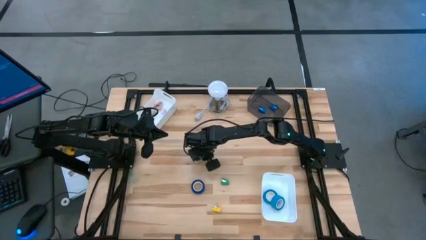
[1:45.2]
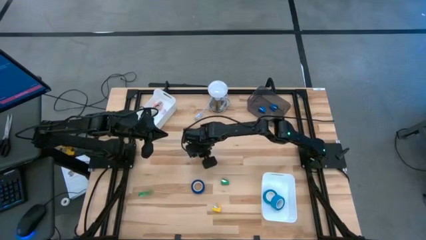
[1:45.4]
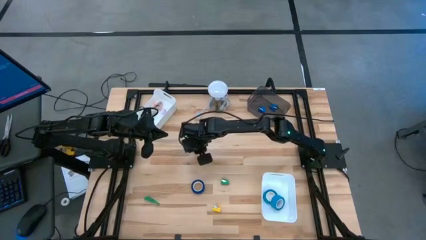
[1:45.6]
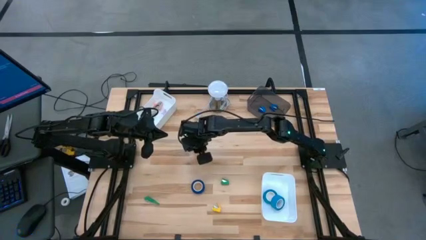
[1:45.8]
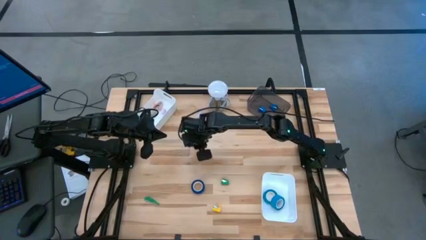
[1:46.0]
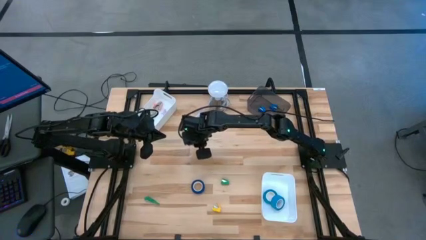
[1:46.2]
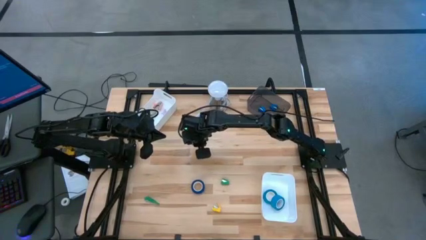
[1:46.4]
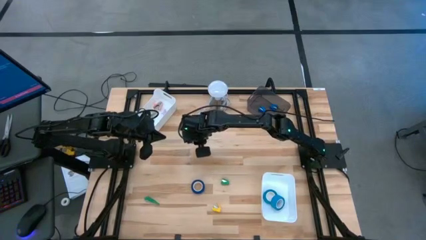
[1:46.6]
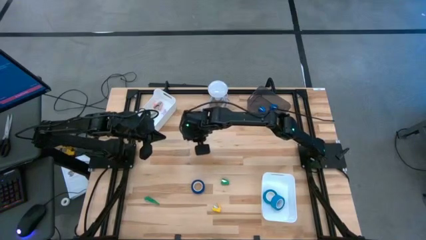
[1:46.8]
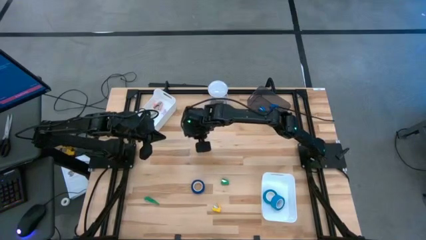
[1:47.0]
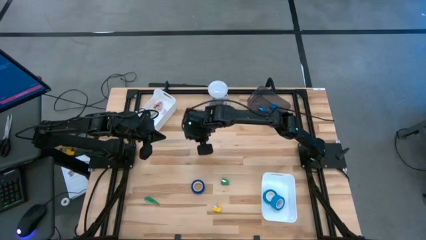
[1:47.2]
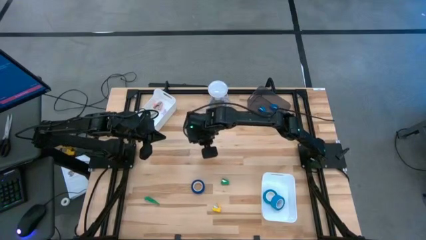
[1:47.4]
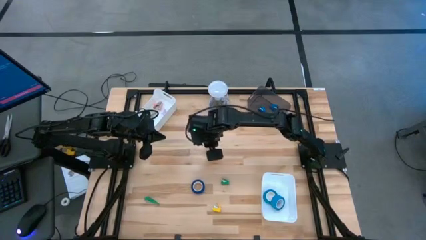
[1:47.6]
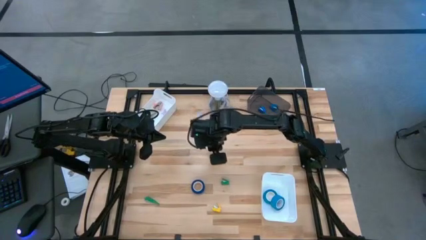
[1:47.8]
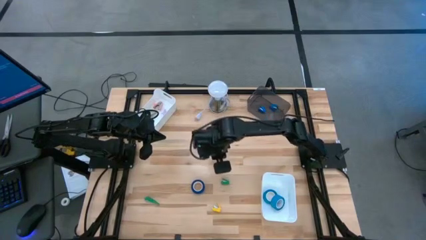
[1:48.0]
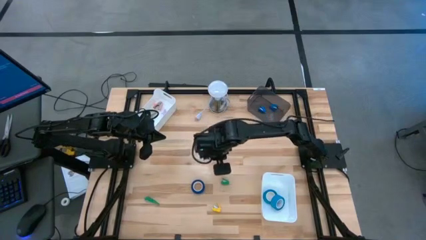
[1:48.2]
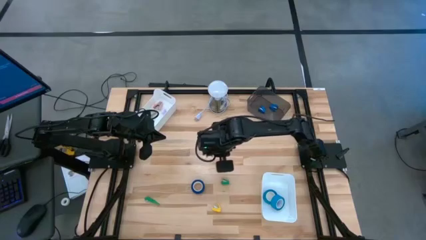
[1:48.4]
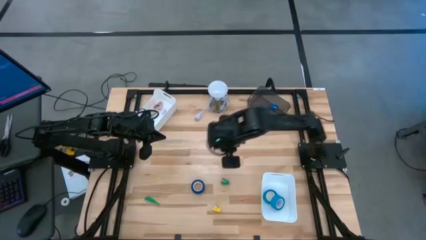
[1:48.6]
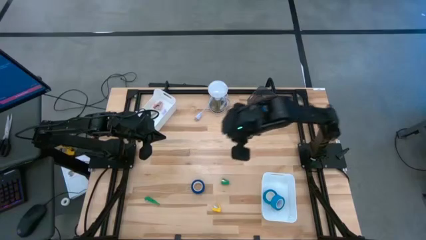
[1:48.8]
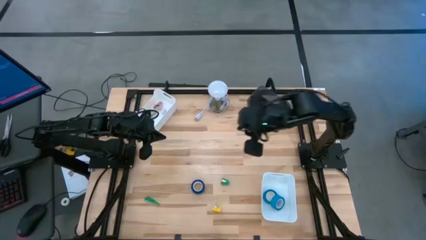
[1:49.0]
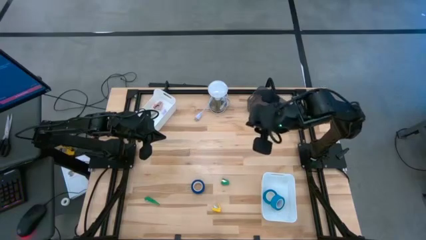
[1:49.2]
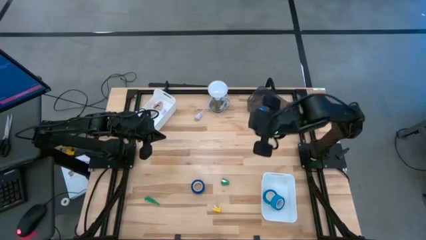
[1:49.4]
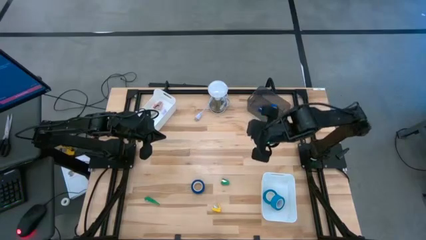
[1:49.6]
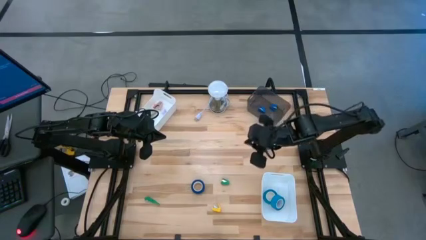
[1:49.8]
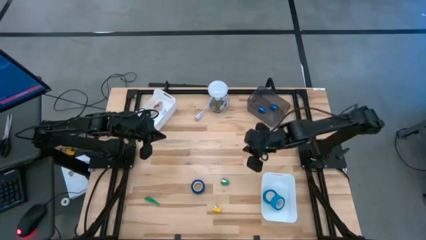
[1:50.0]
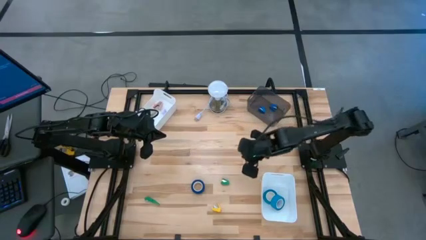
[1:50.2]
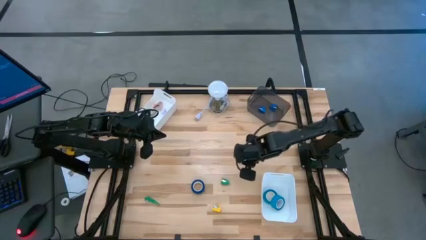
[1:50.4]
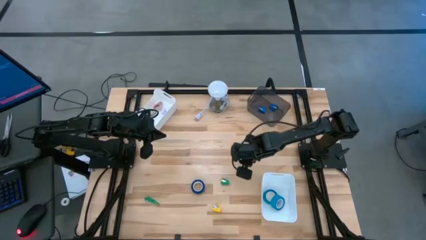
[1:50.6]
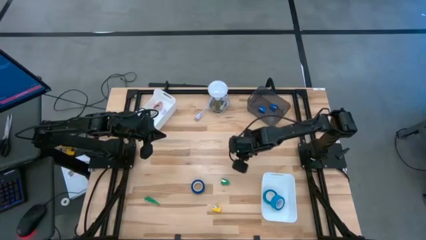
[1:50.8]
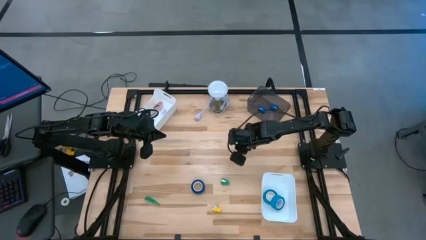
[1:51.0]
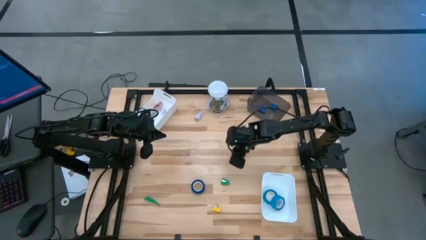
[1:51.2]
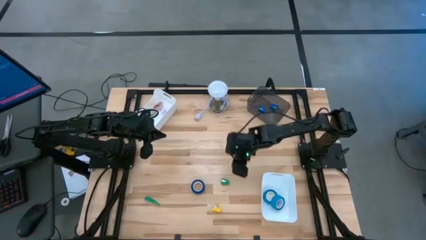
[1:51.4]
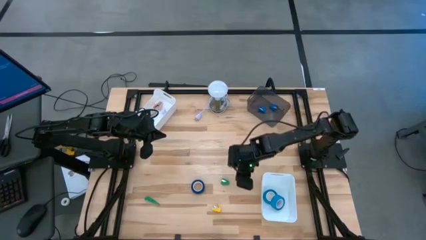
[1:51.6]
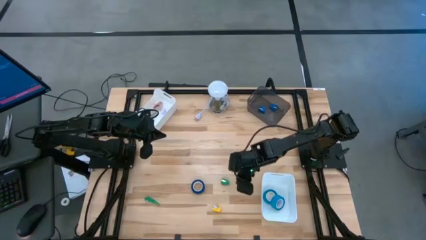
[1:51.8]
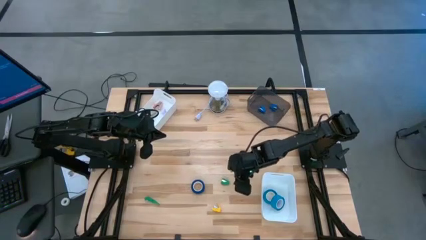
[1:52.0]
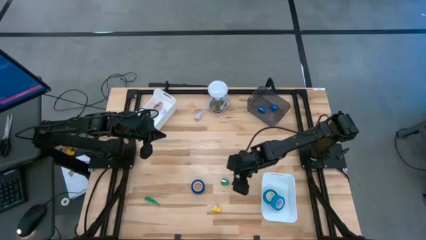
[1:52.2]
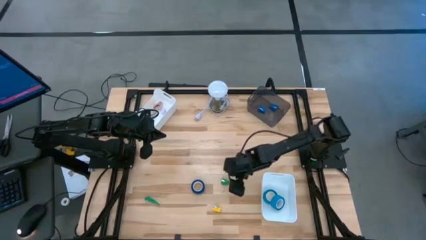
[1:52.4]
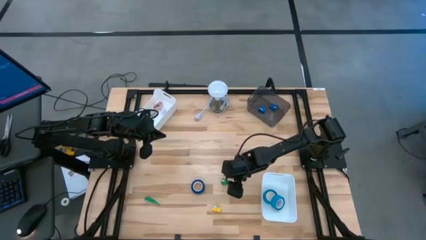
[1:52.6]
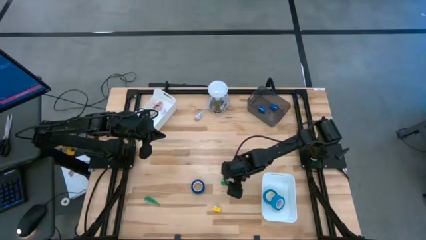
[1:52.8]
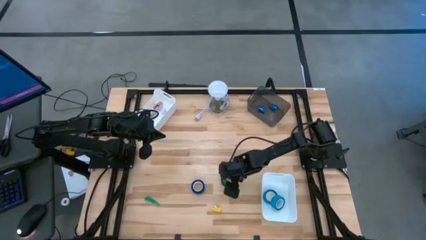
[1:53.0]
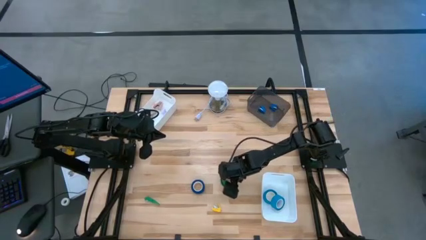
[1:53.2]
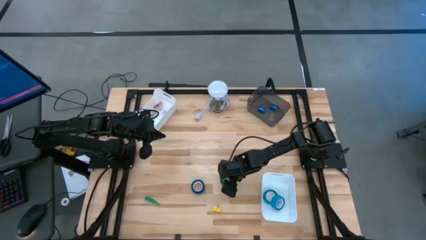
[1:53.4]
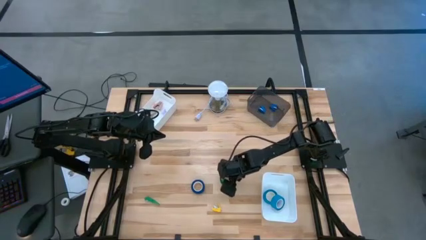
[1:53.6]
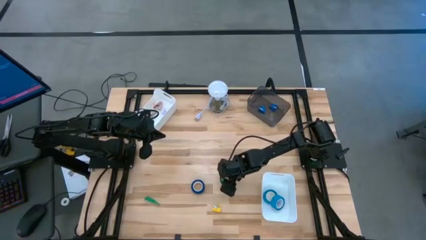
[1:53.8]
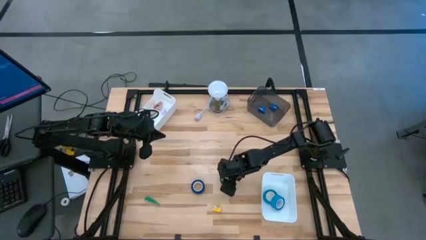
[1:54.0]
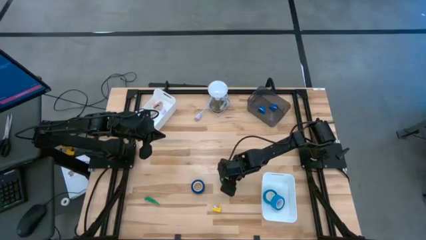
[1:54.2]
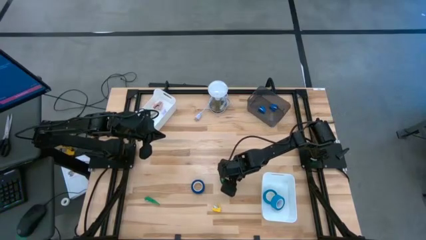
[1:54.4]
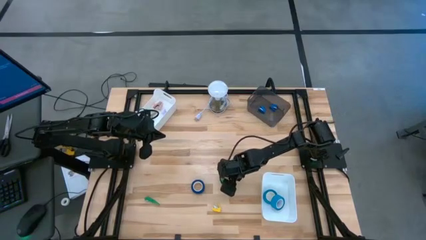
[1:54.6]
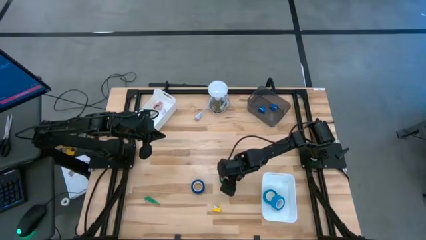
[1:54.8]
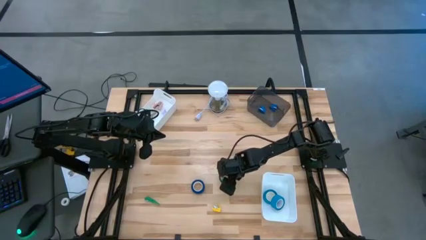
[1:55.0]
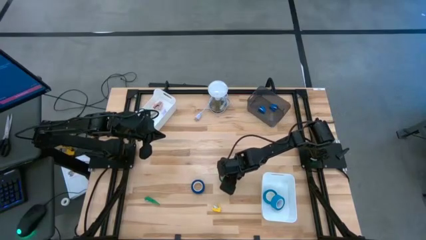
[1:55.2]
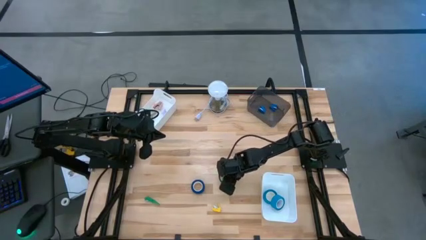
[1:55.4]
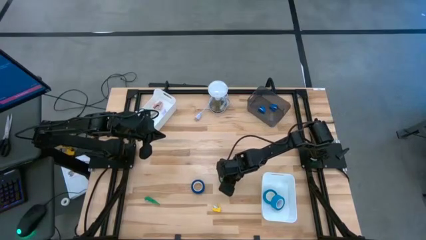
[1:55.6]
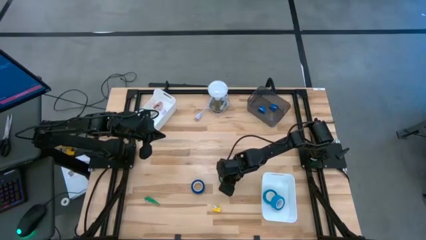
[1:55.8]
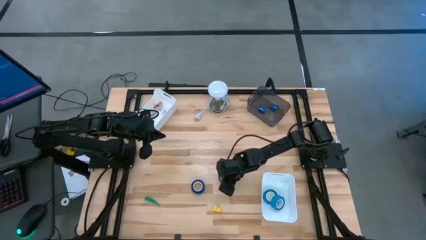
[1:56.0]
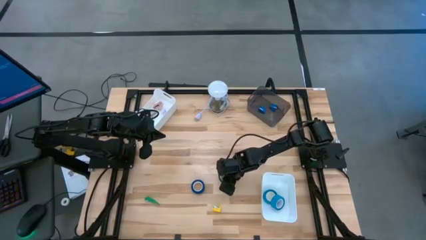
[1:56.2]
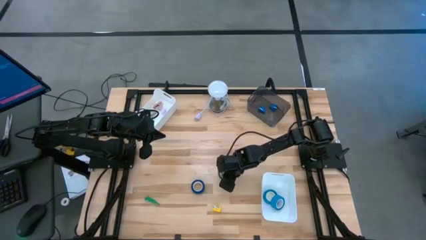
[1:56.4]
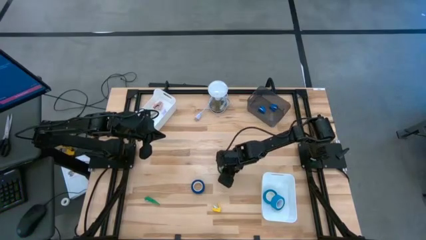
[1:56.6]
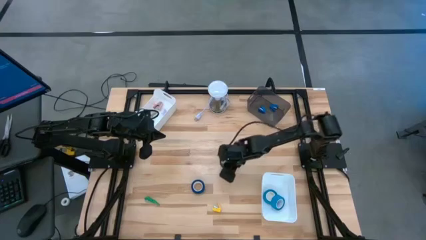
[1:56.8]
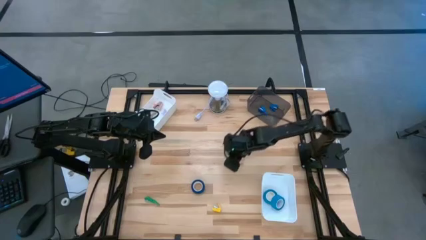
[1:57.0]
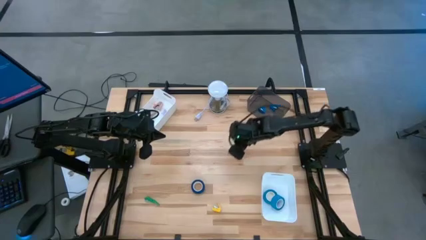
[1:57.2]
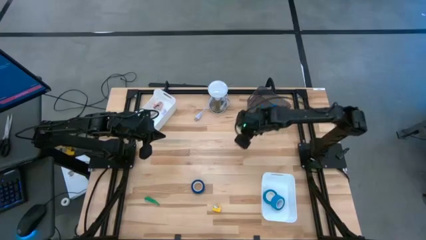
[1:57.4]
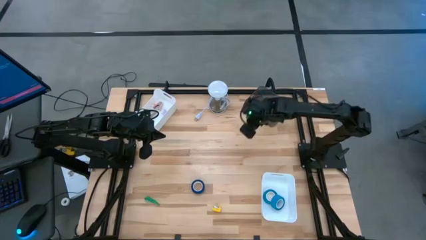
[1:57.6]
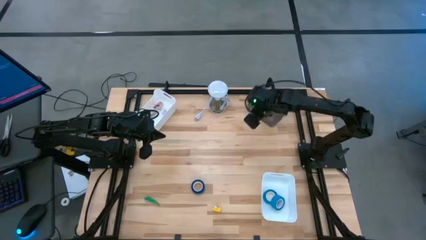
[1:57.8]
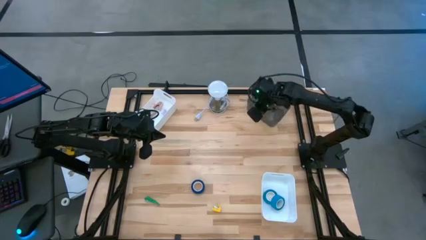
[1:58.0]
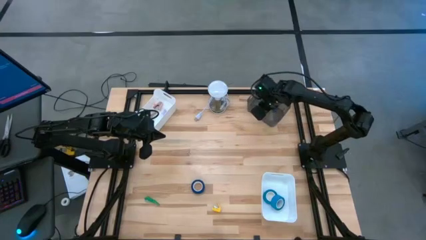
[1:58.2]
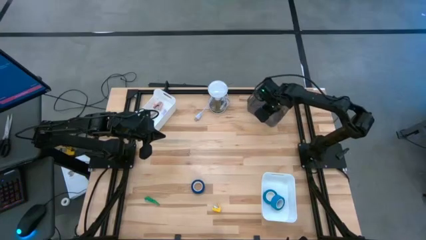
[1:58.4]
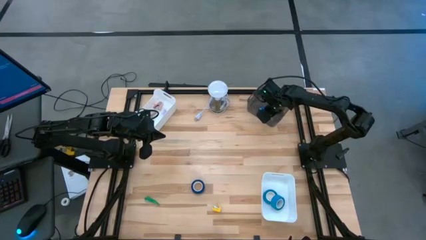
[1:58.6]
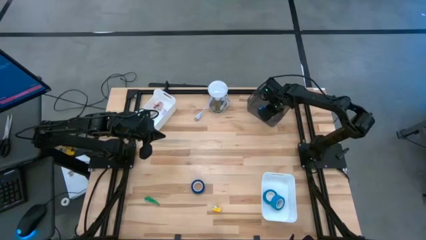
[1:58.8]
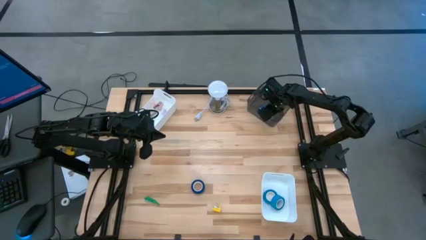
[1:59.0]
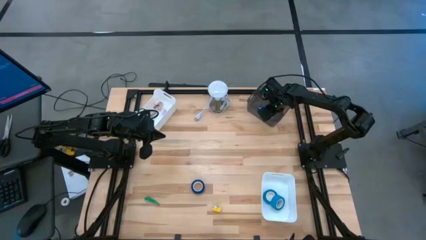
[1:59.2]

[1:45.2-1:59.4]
Task: Pick and place Stapler, Stapler remover, tape
Put the right green stapler into the black bin

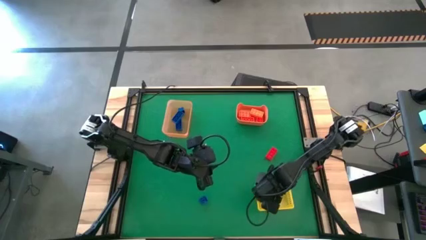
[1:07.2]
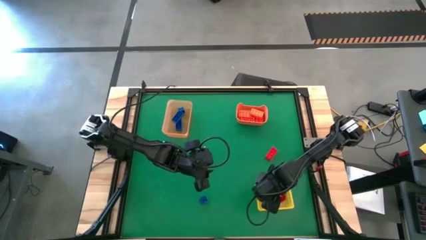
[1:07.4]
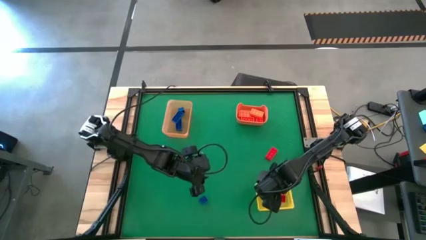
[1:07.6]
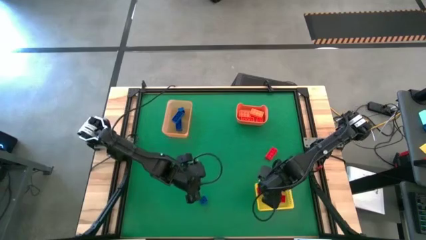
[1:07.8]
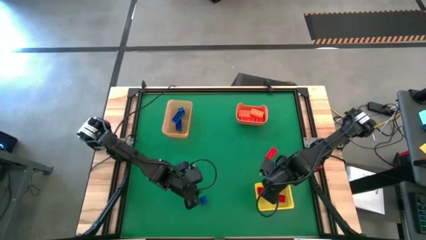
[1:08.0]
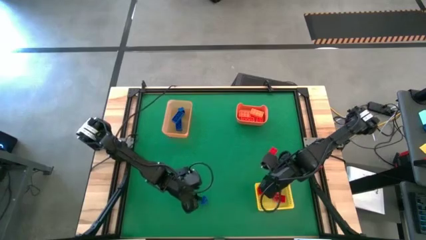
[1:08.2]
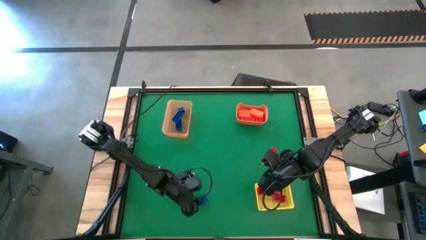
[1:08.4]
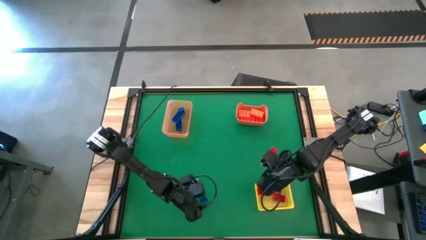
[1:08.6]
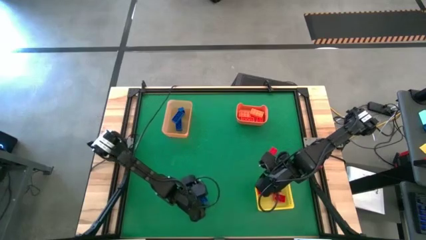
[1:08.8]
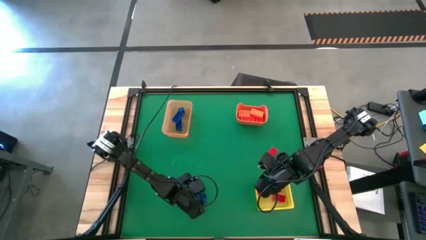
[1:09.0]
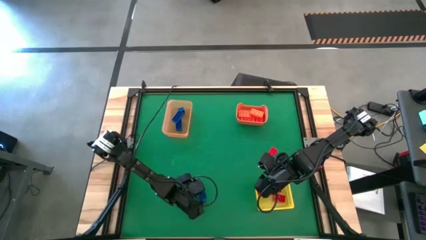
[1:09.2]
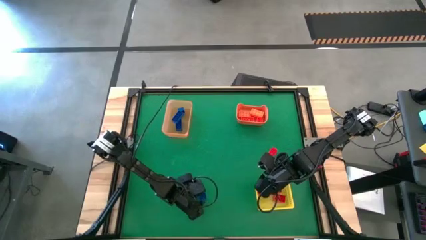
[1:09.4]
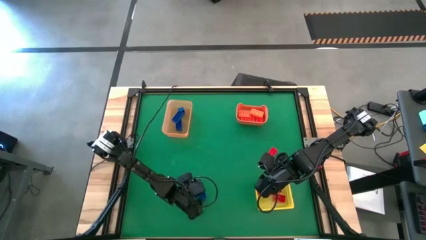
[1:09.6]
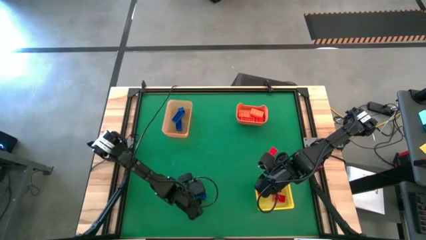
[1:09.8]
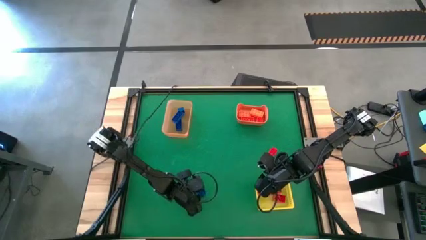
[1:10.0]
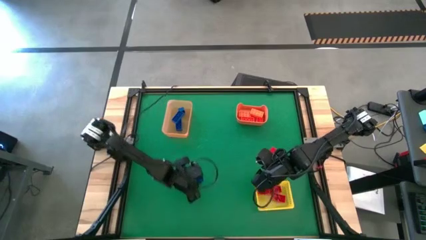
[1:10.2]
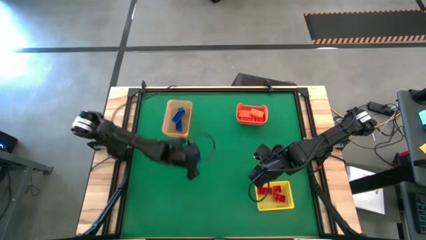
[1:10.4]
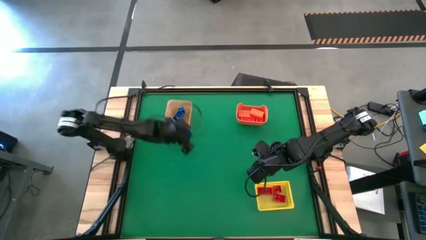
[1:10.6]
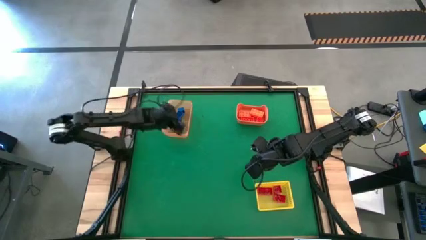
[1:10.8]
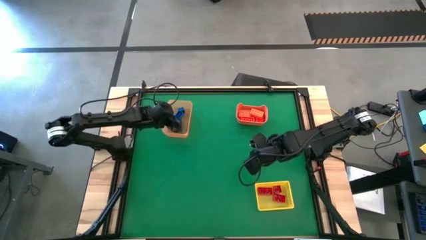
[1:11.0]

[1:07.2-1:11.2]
Task: Sort & place blocks by color
Put the blue game piece into the light orange bin
